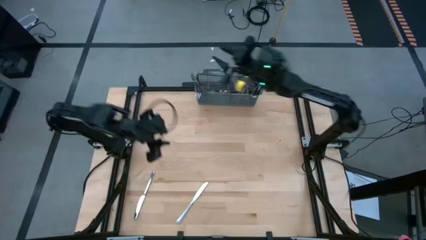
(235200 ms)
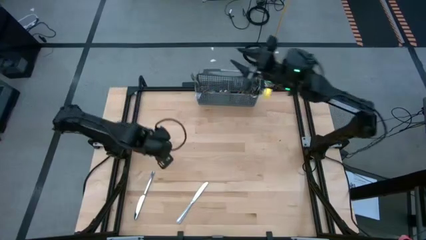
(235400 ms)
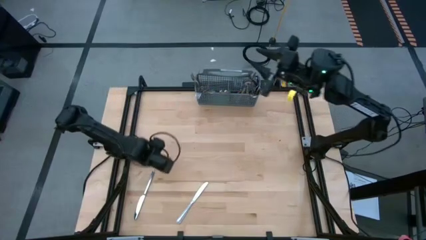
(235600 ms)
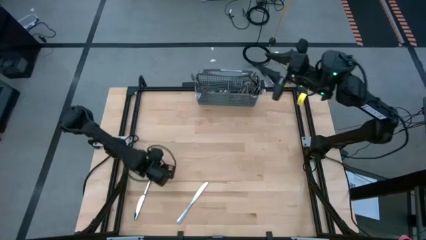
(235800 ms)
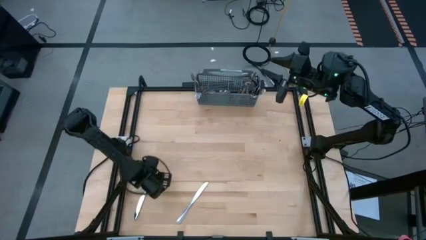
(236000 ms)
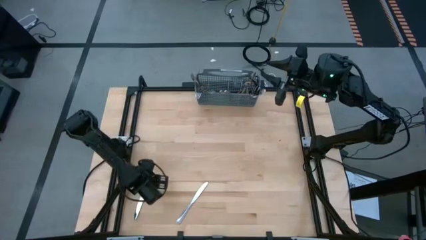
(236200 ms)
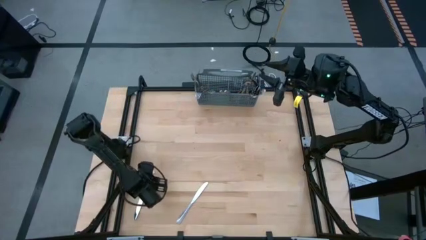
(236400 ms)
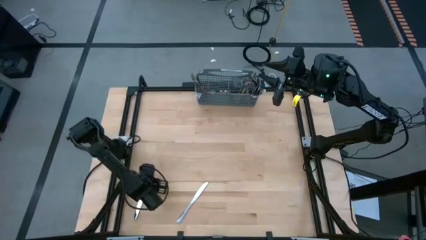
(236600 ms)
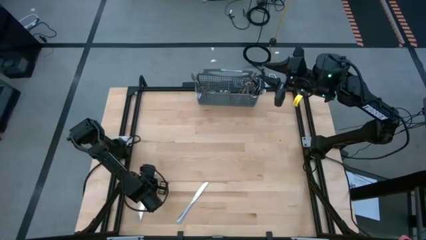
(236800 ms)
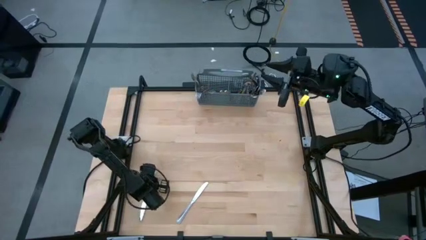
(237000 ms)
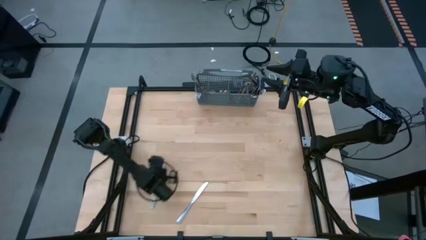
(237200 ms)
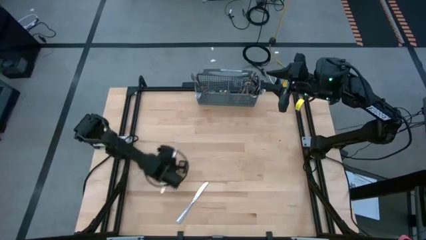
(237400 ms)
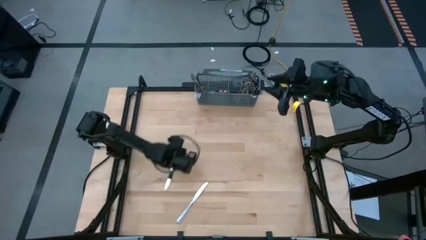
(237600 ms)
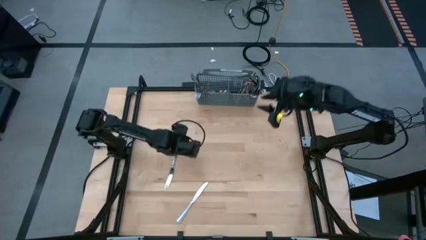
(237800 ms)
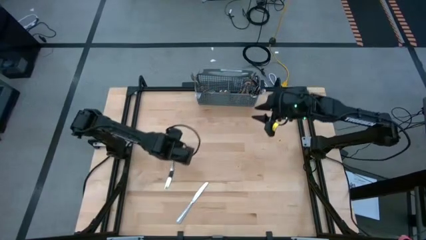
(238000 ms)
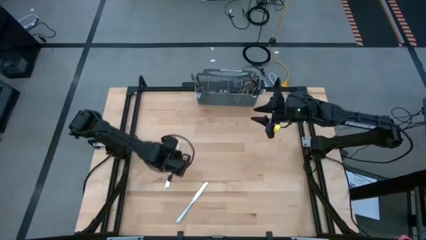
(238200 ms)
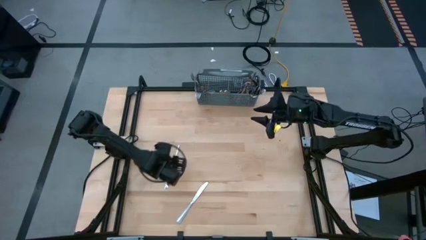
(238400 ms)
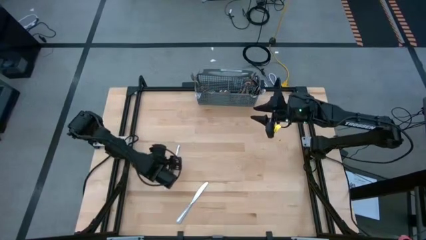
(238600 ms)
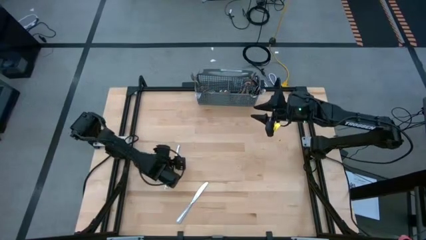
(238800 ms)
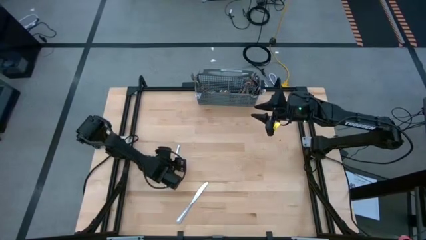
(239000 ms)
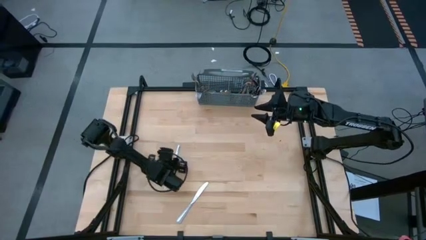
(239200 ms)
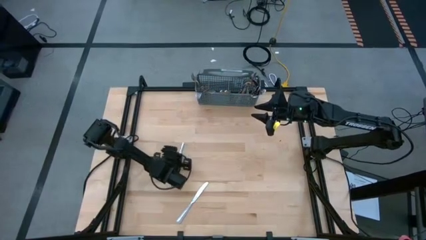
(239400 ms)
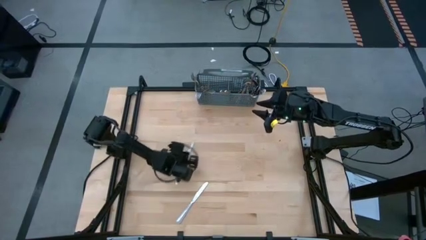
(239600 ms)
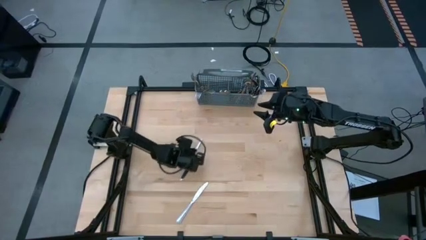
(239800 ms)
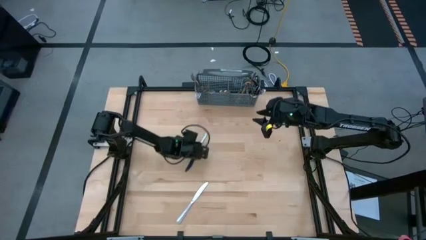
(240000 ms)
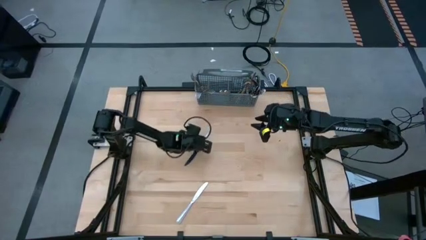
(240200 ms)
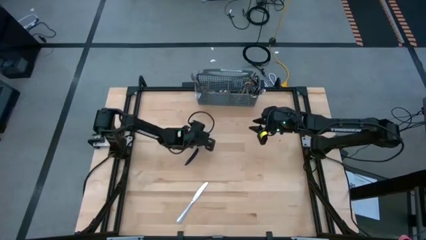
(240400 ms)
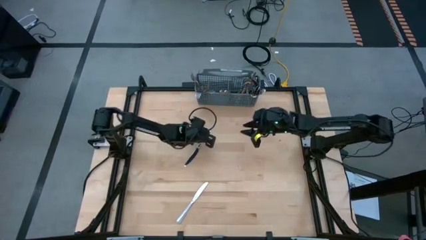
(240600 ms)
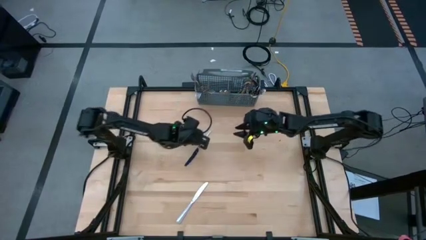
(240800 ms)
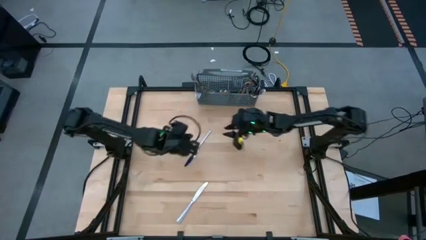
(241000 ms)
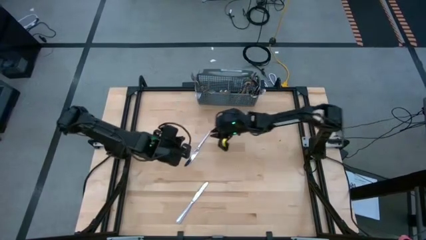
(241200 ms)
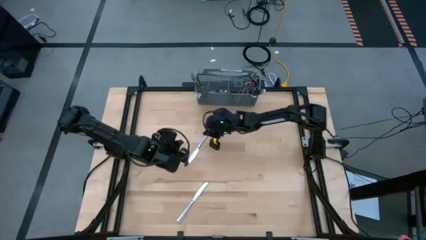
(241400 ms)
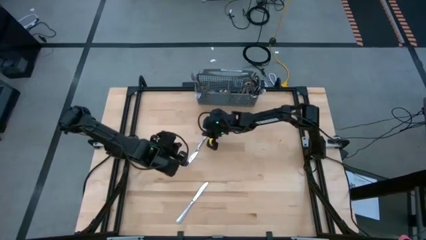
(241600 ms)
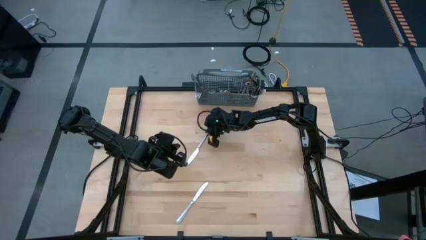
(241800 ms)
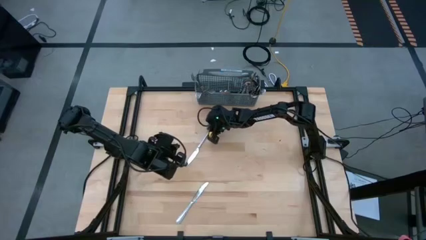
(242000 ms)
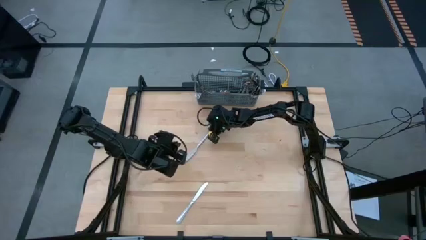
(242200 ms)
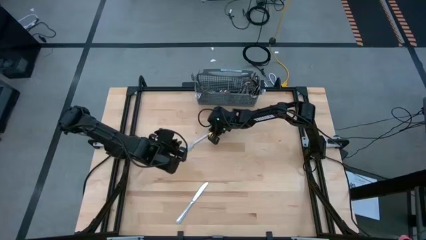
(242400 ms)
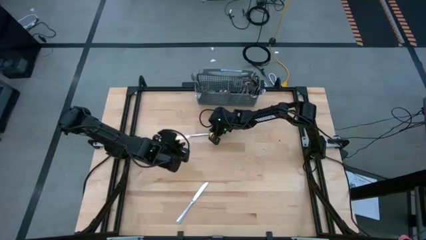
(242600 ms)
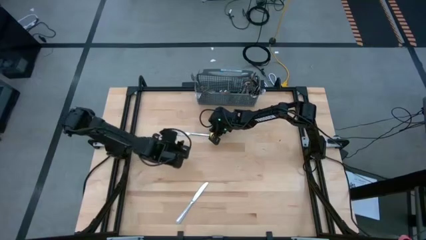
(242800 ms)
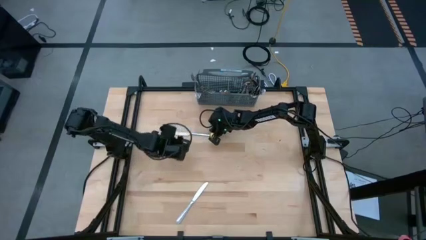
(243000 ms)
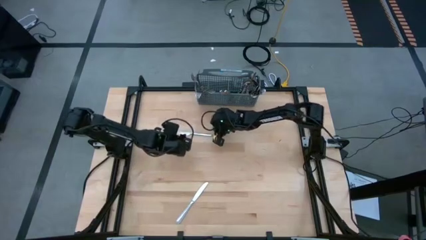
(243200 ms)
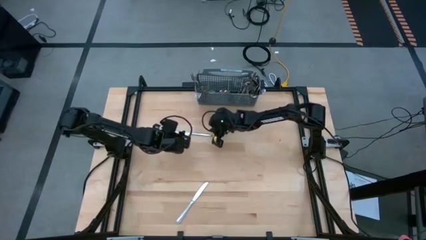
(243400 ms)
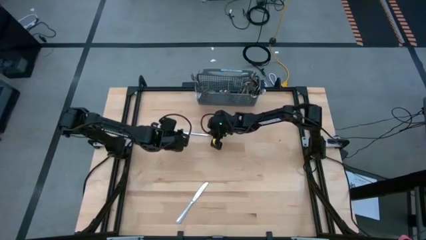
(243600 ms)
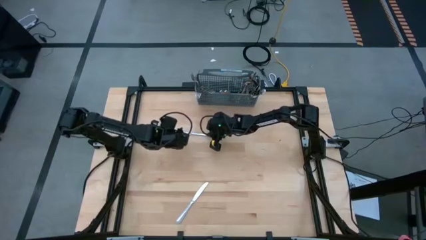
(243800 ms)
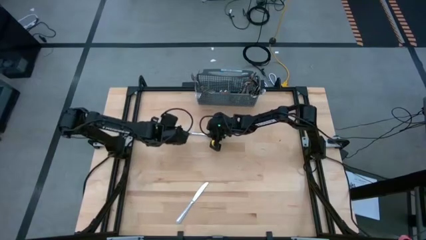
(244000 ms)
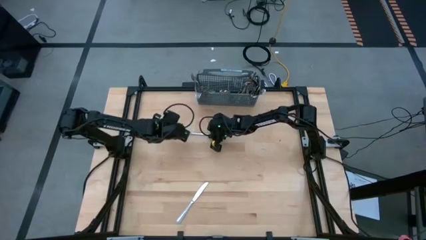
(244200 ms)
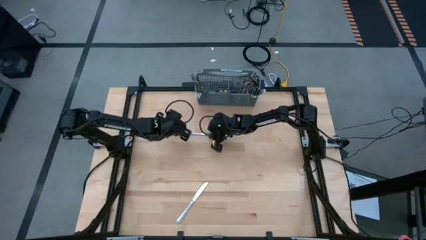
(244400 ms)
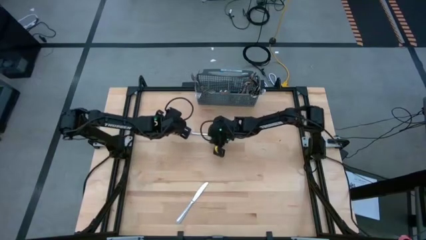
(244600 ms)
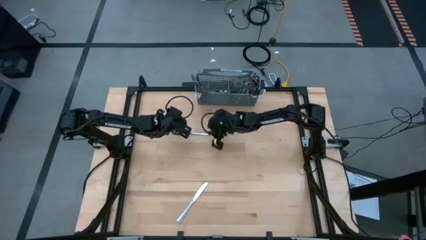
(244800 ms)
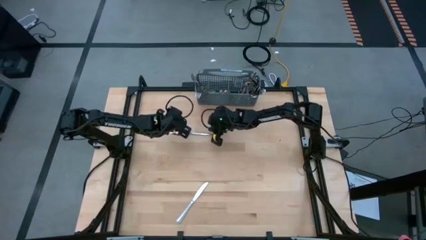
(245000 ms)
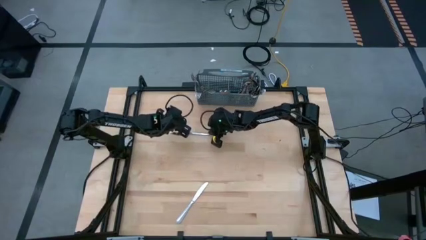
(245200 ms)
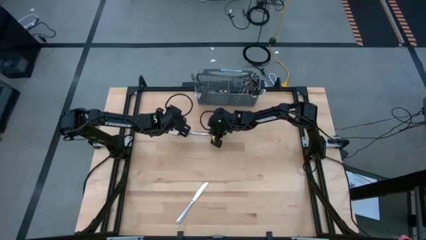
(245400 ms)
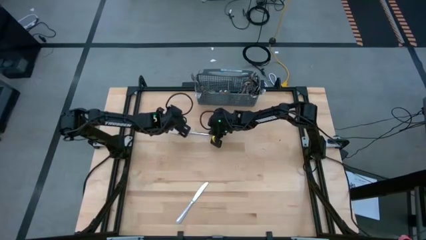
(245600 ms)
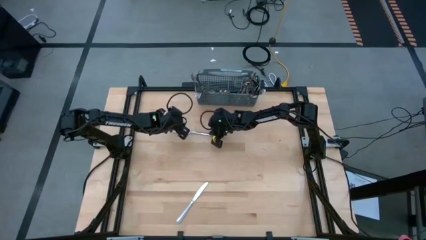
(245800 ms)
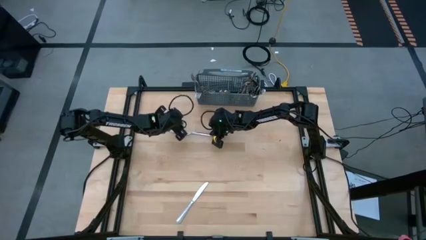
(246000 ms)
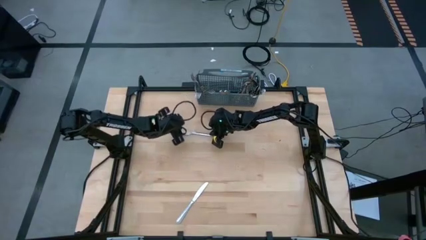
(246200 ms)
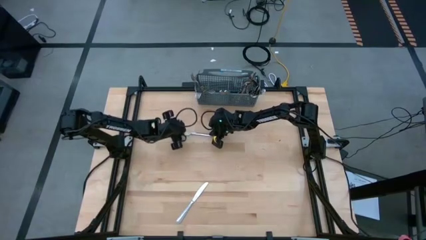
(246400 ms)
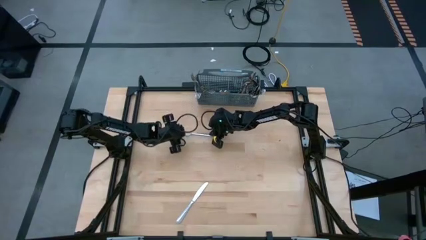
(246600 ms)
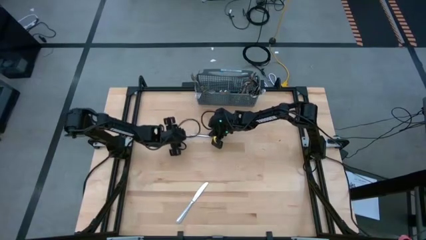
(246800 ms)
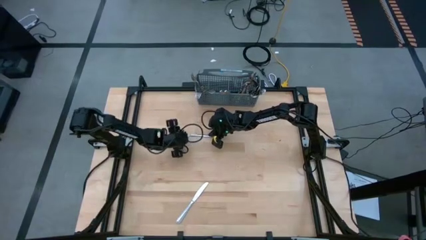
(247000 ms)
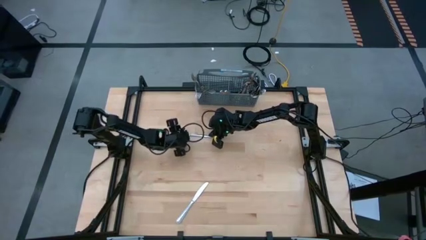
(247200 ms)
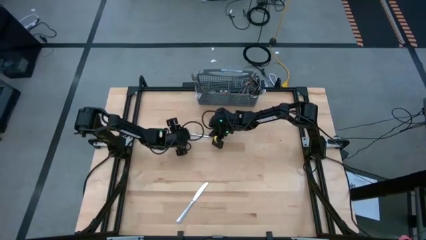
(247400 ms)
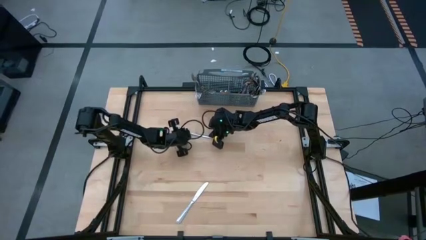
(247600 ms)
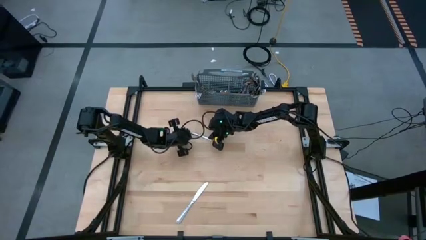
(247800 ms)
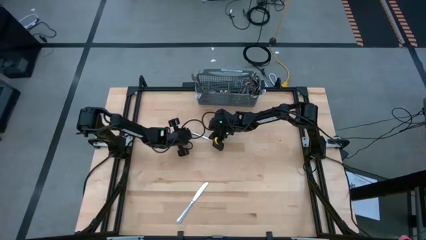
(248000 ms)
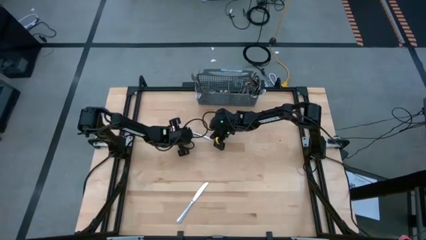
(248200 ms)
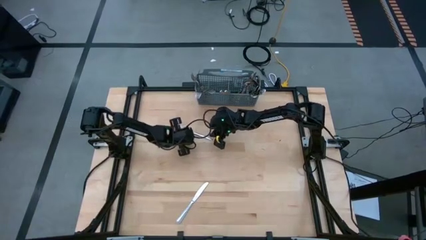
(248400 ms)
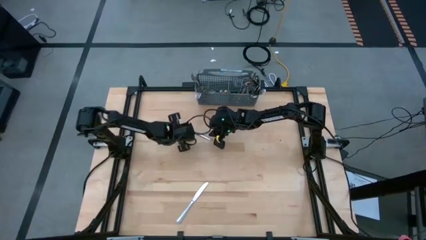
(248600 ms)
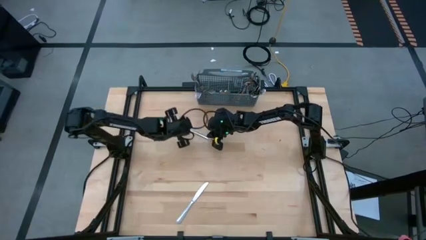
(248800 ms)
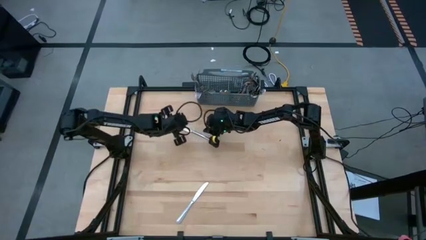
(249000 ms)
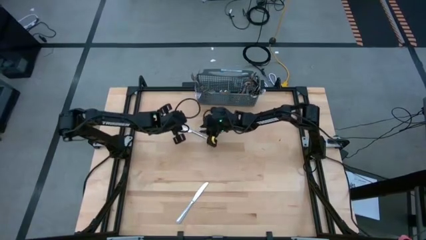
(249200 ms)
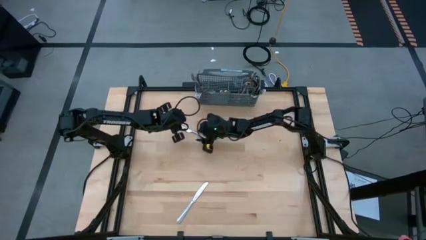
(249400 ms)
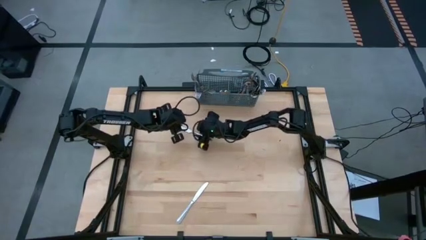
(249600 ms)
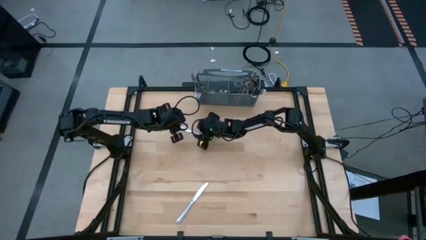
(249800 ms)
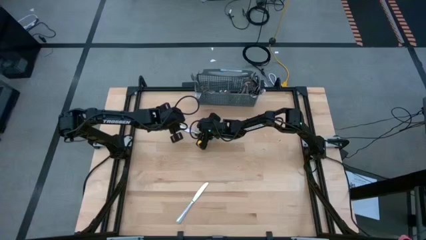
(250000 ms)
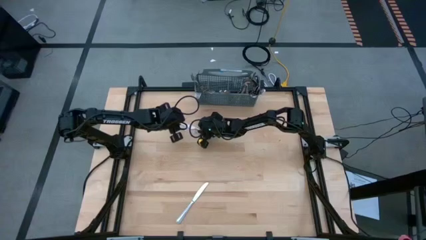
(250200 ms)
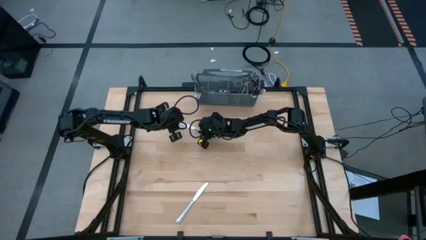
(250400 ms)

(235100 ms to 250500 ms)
Task: Sort silverware
Put the silver table knife into the silverware organizer

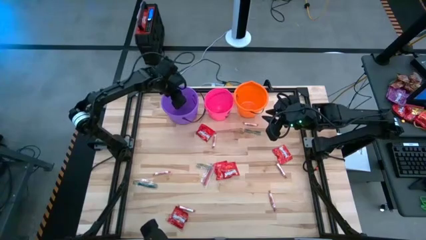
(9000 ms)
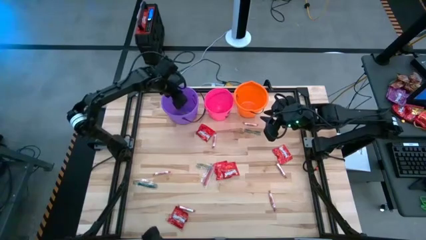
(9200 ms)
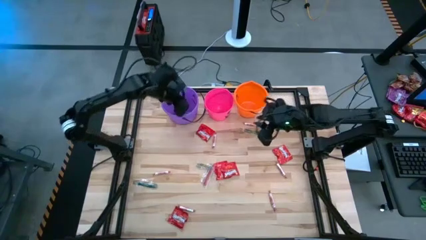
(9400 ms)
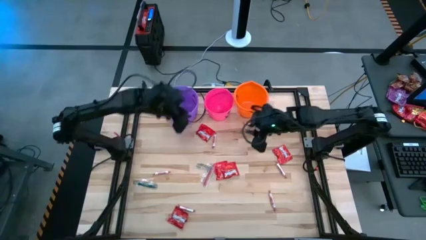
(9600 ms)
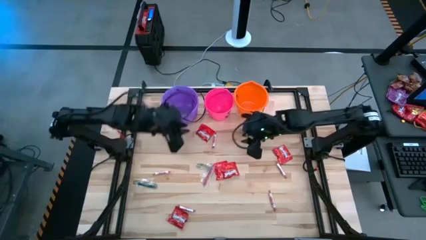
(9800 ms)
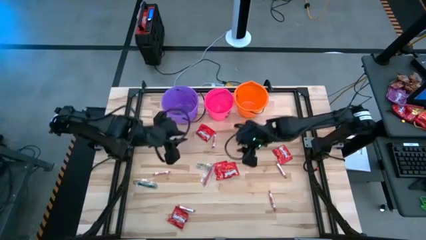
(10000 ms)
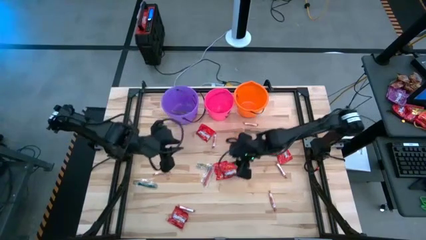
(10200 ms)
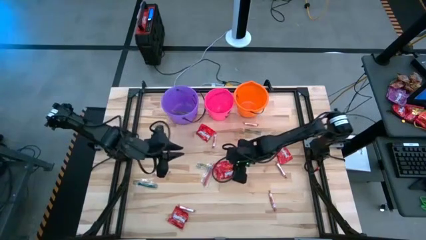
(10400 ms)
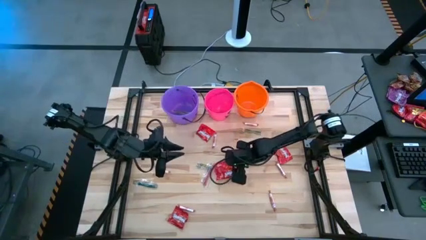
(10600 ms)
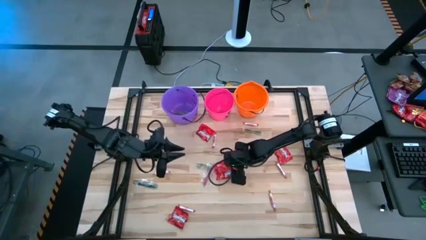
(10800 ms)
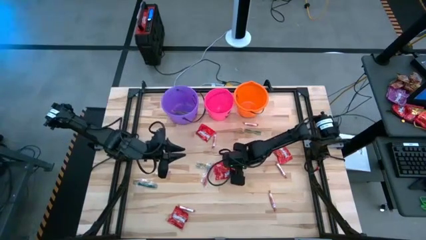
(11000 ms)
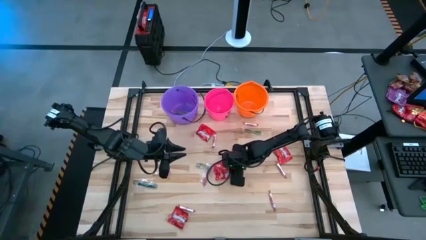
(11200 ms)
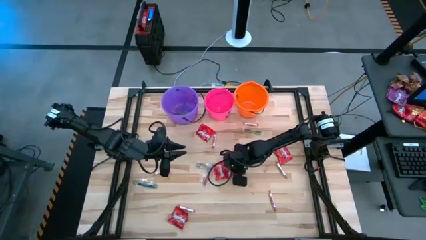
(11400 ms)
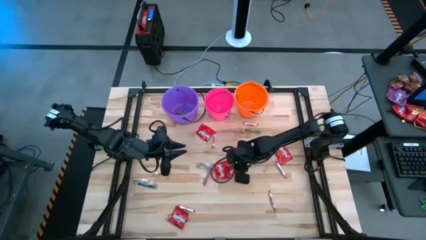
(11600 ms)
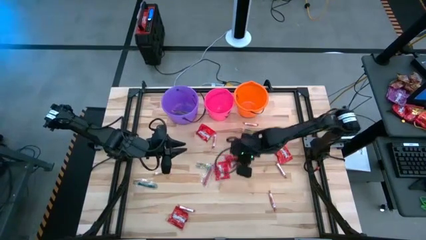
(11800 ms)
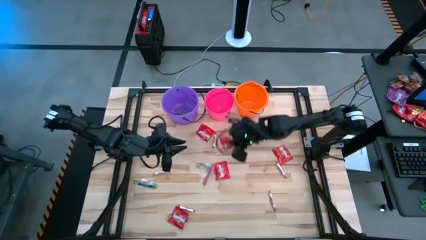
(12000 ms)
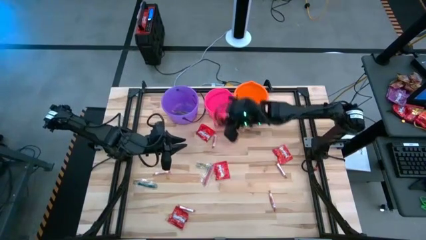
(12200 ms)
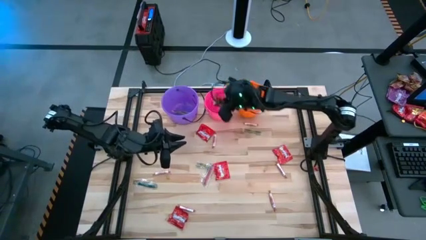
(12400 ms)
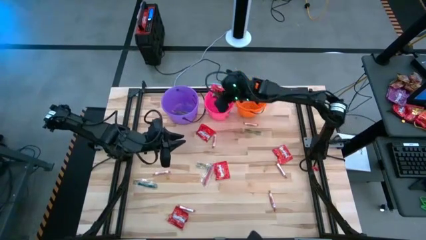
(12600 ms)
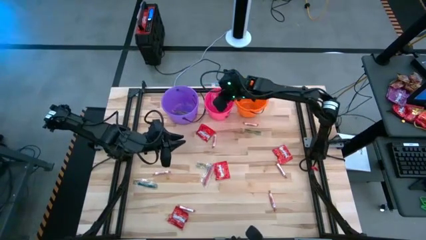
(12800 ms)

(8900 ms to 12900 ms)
Task: Sort candy by brand, put in halloween buckets
Put the red candy pack into the pink bucket
